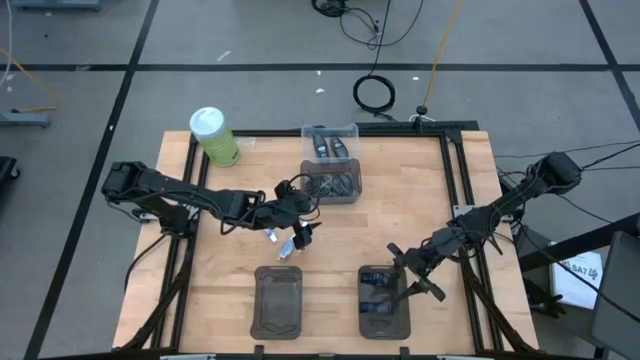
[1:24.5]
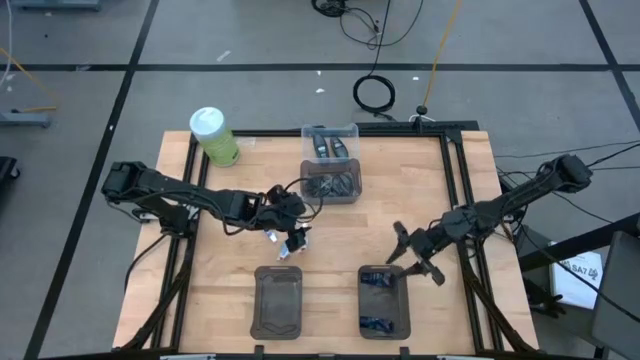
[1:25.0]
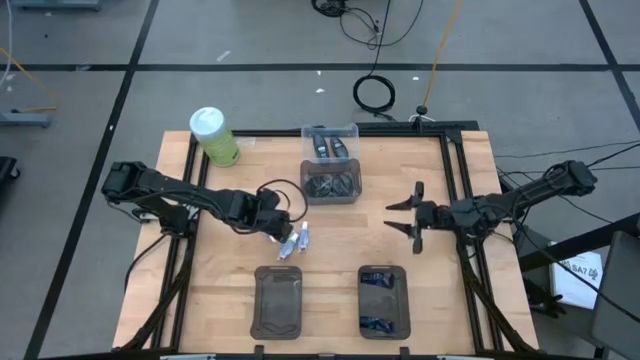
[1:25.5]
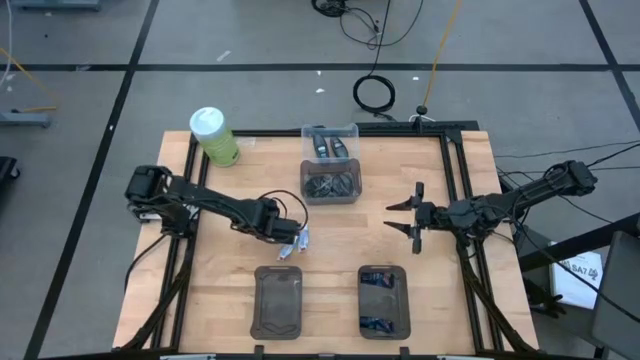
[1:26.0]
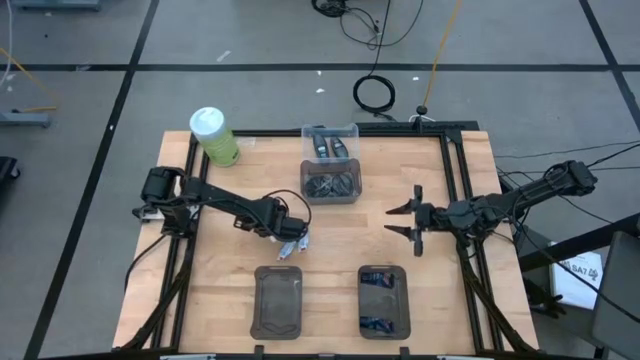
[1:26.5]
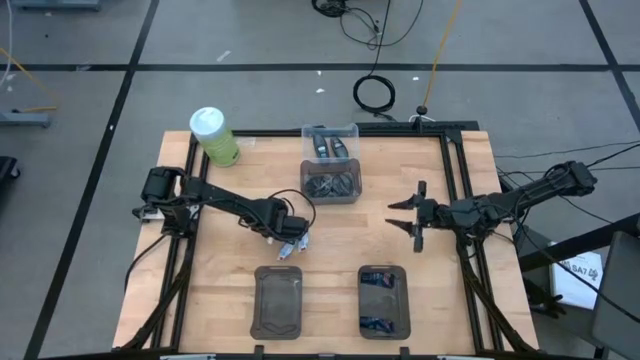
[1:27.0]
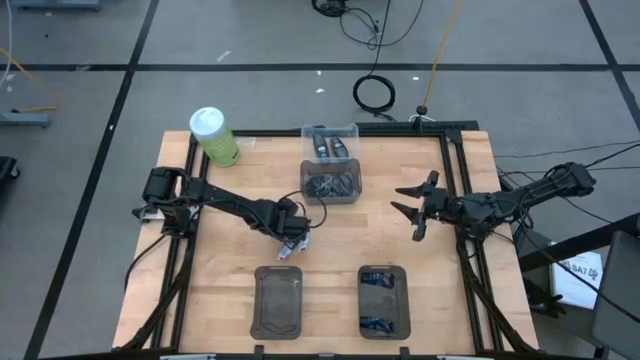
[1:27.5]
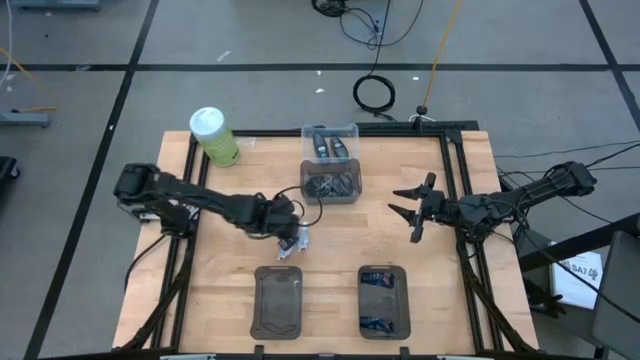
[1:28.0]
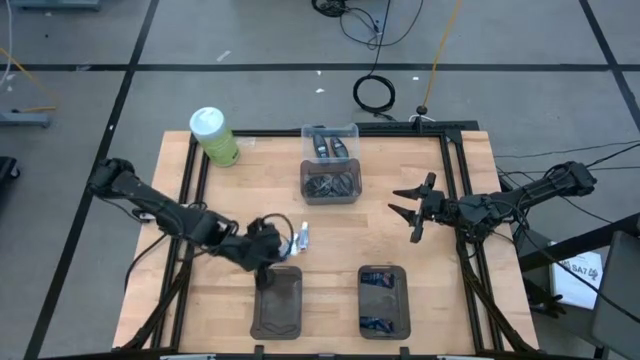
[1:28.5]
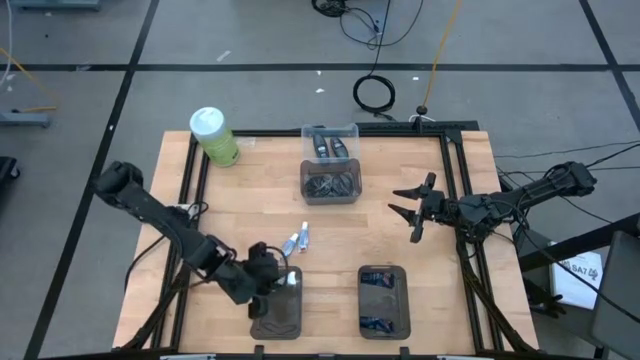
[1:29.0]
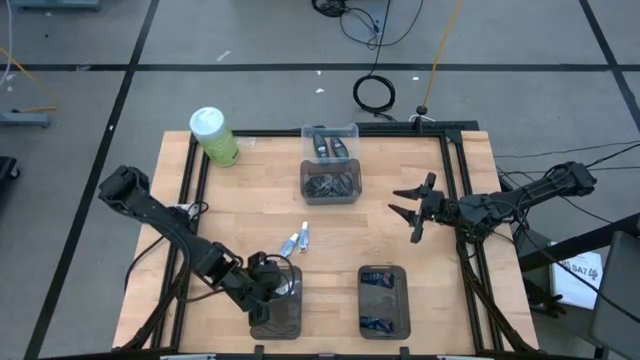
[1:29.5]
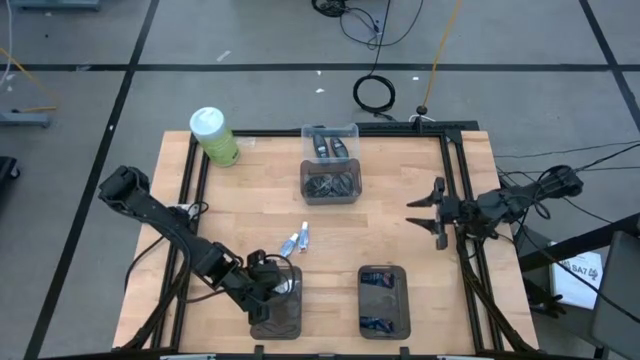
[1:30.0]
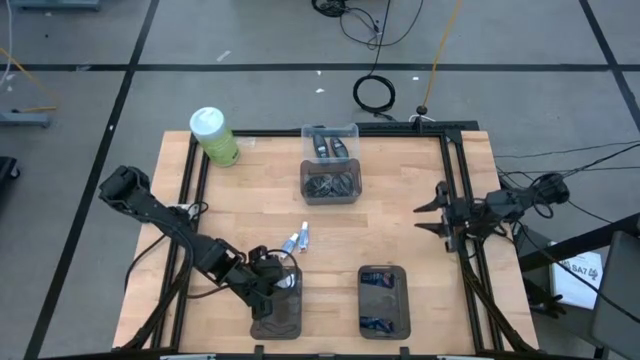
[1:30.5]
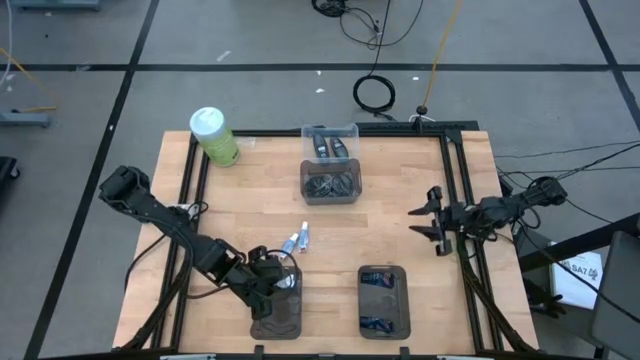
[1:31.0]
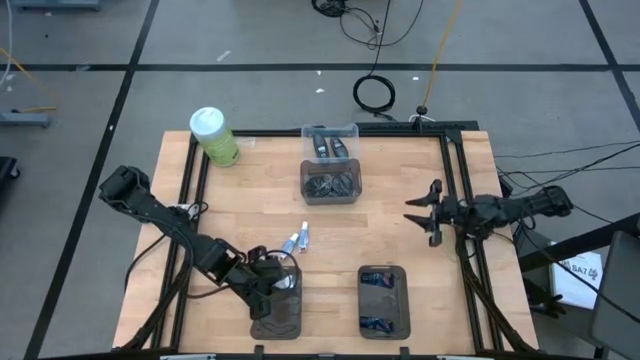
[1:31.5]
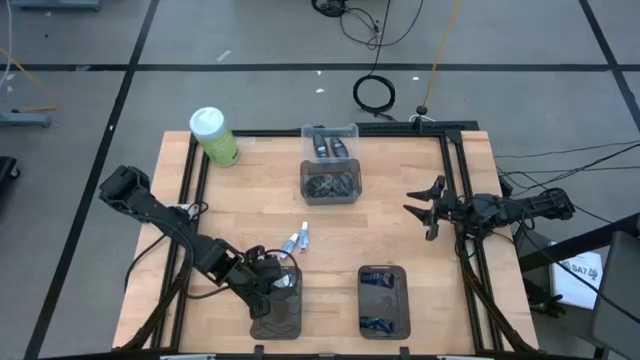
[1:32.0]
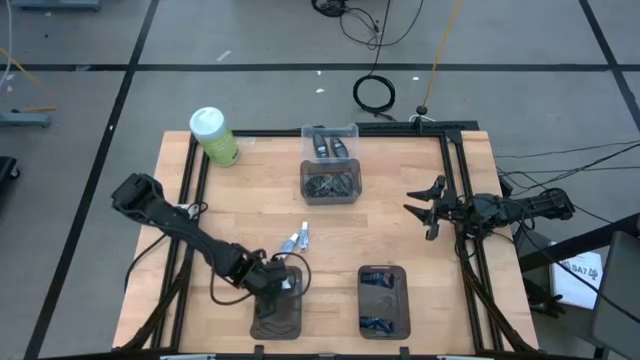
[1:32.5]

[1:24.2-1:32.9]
Task: Pick & Place Travel size toiletries
Put the left white toothpaste into the left black bin

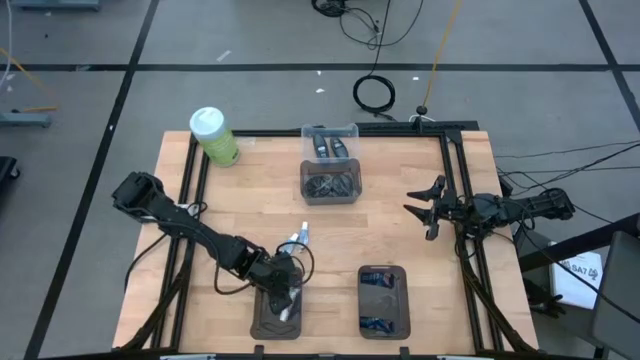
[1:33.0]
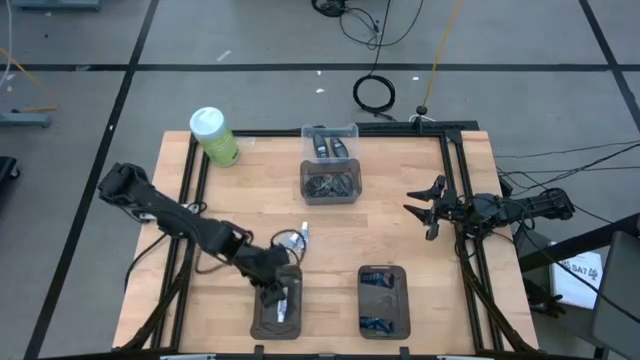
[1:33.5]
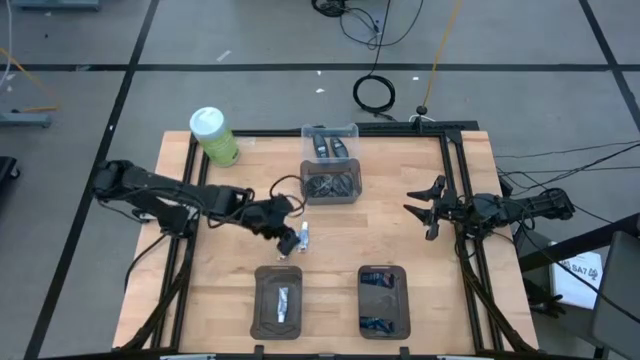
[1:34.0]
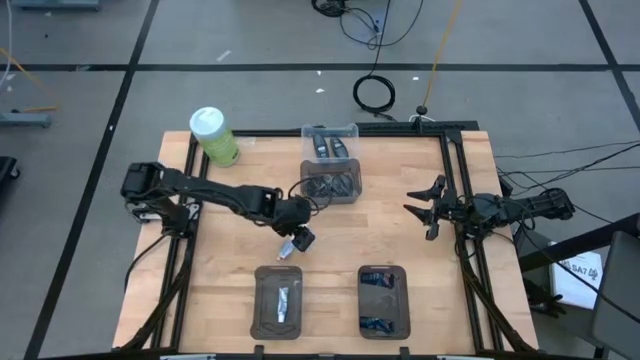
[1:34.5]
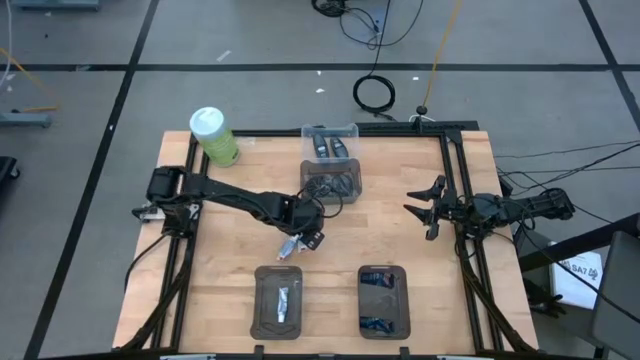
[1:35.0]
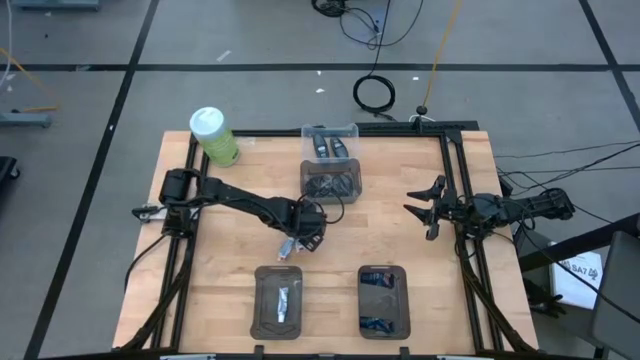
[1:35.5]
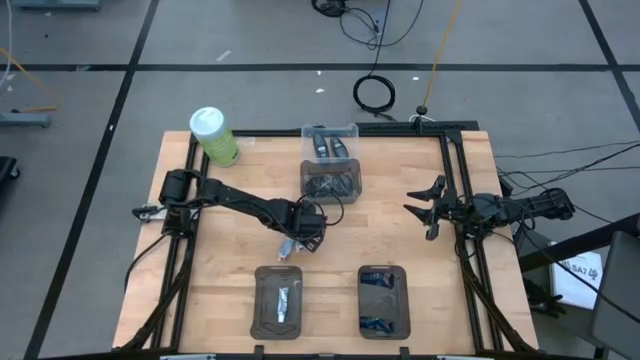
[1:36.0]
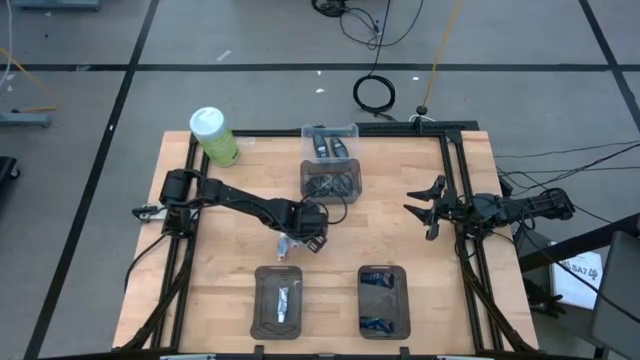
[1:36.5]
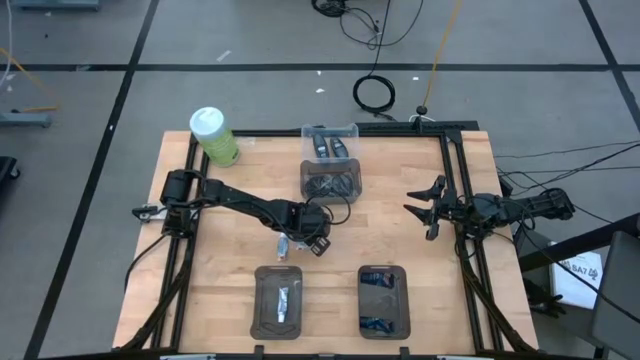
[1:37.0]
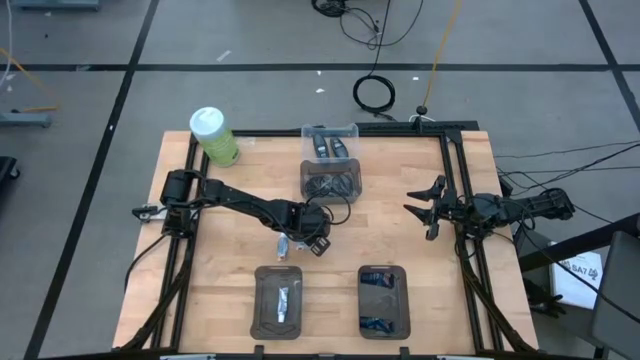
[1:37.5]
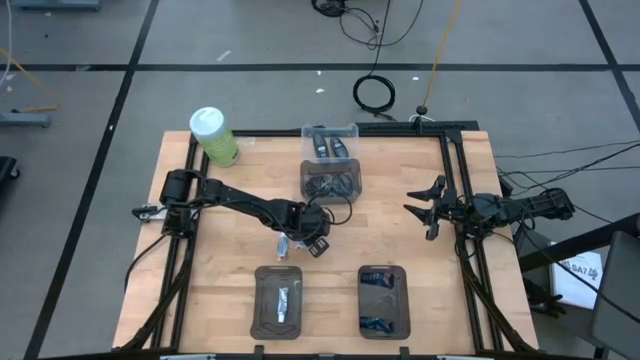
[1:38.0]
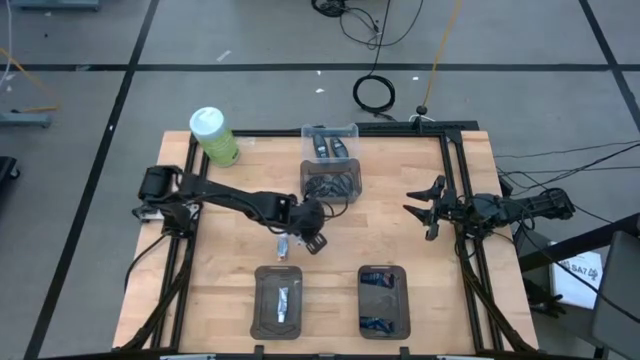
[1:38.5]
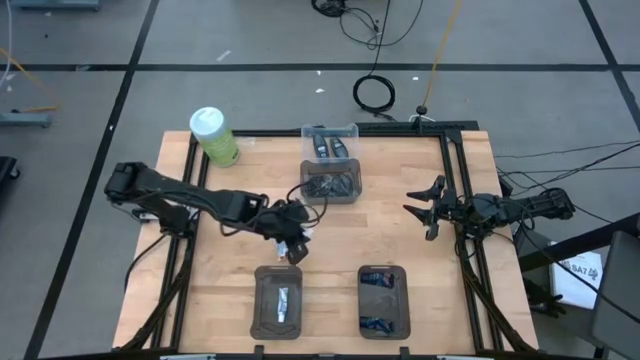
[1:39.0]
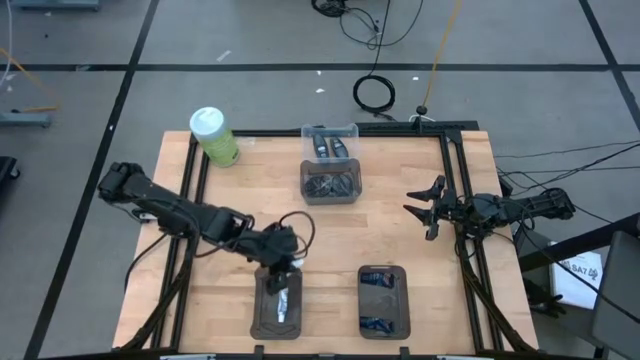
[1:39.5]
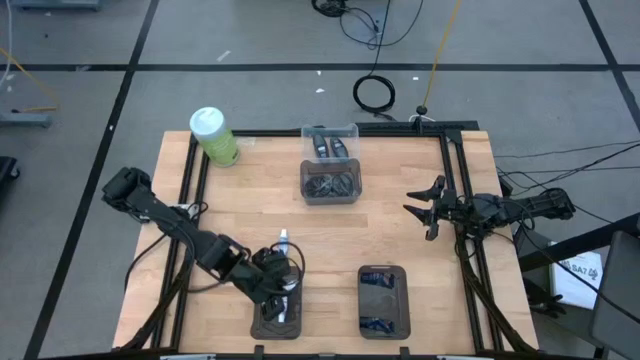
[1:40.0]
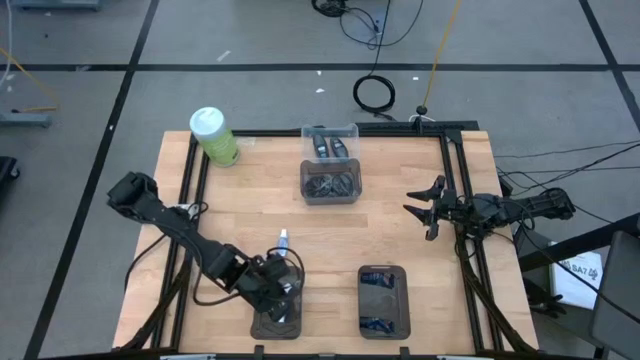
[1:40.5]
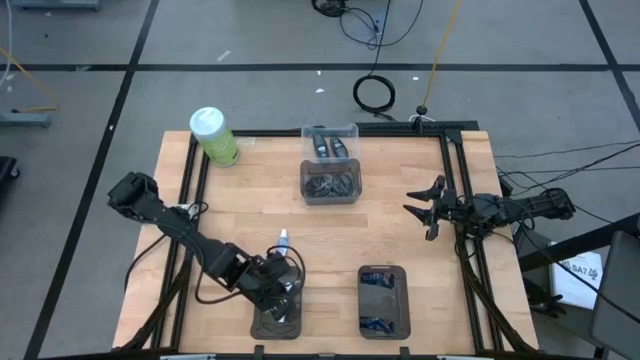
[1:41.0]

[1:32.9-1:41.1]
Put the right white toothpaste into the left black bin

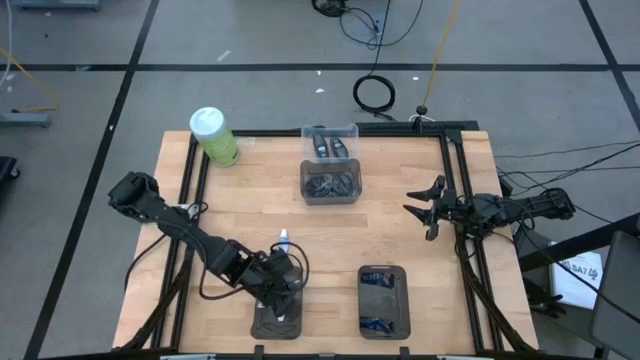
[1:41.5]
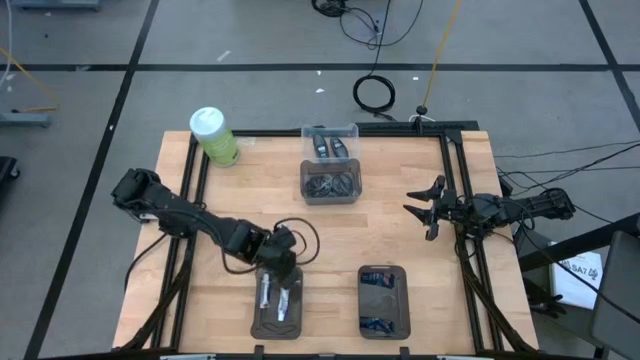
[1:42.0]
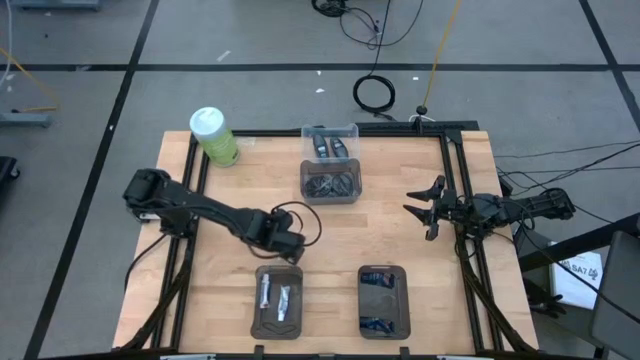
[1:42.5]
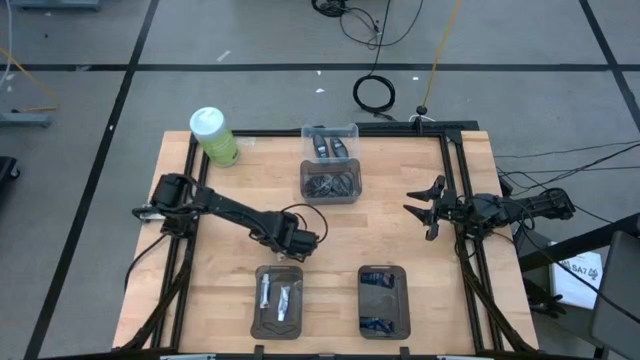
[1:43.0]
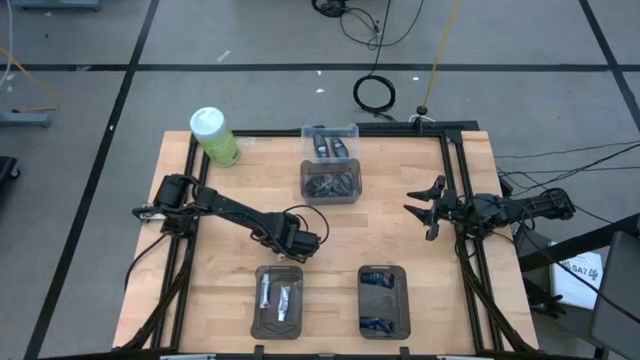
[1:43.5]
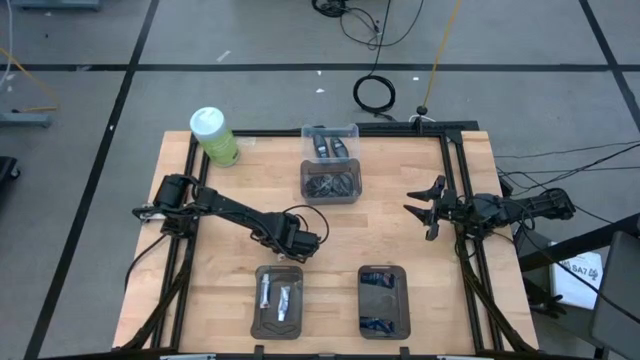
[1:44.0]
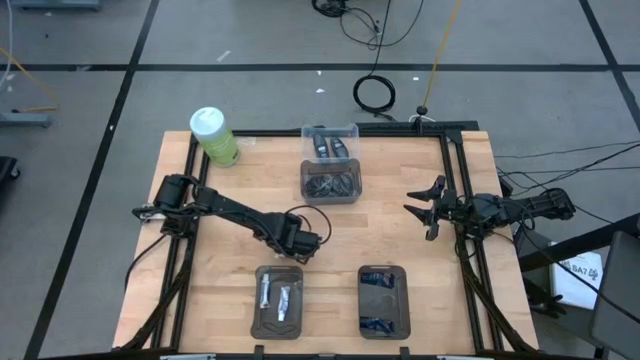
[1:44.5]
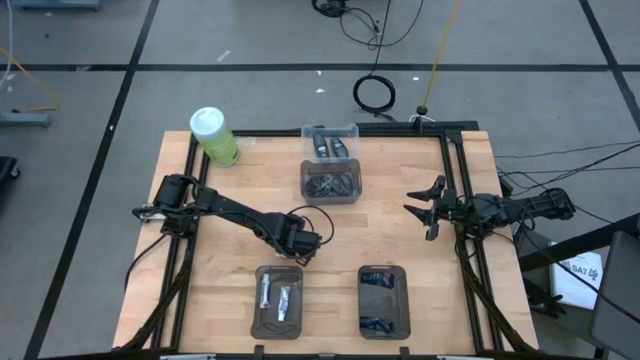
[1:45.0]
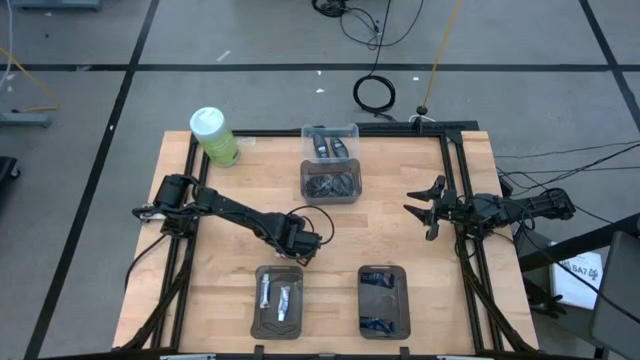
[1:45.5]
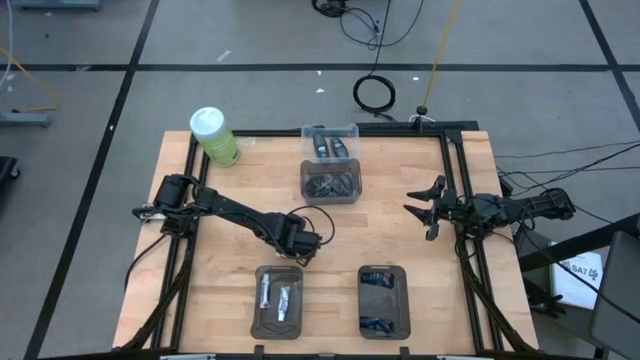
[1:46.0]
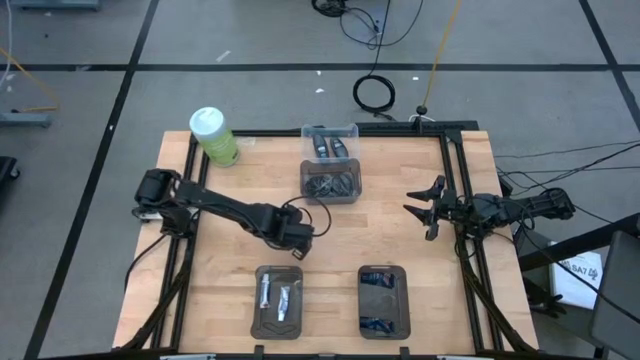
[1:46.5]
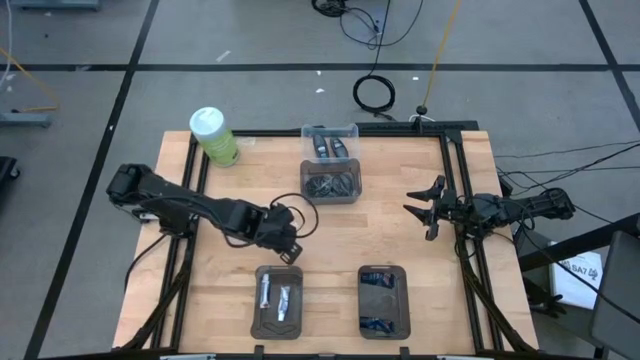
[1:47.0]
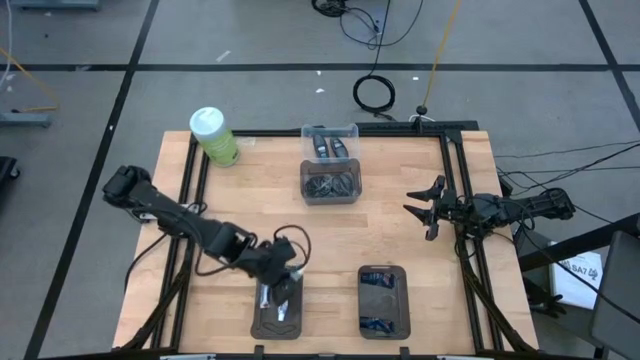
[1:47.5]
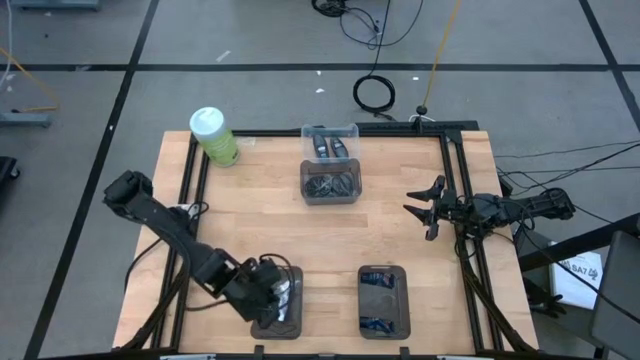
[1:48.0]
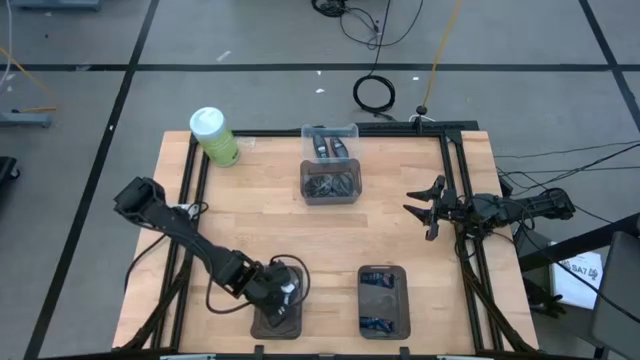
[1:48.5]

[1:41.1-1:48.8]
Put the white toothpaste into the left black bin
